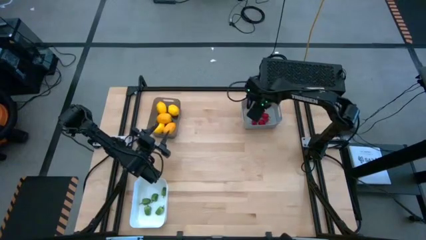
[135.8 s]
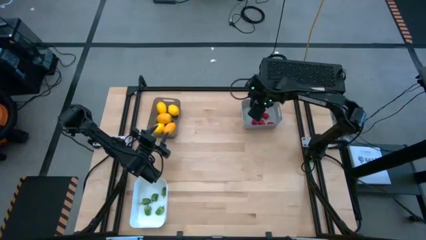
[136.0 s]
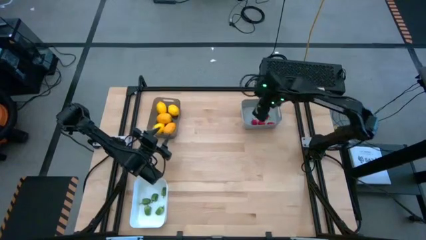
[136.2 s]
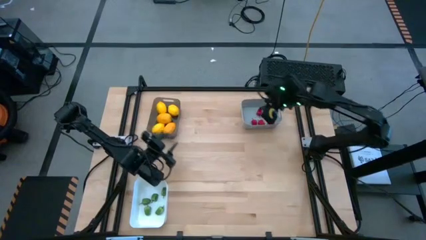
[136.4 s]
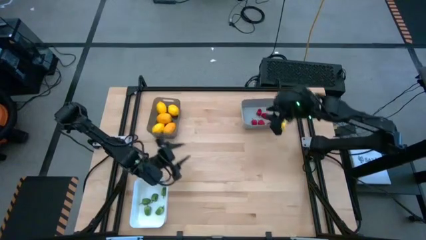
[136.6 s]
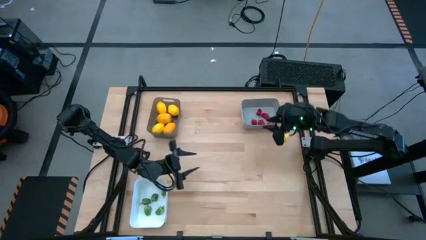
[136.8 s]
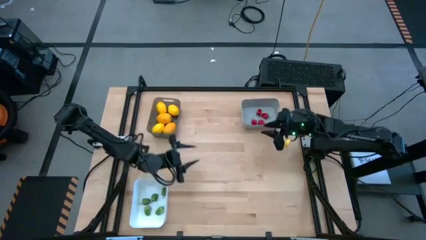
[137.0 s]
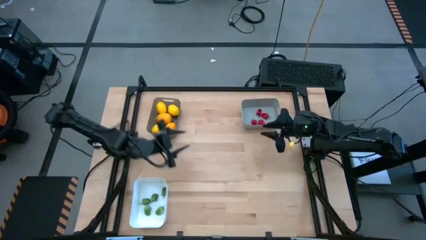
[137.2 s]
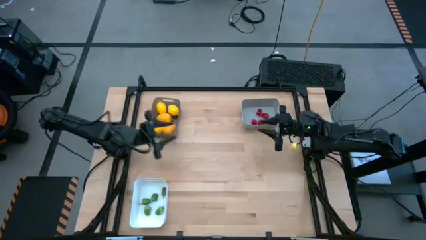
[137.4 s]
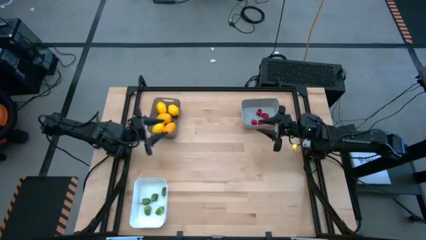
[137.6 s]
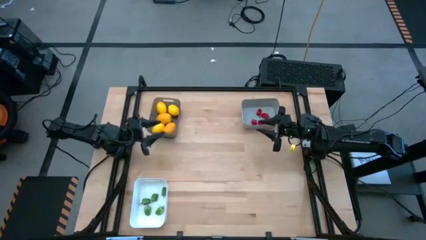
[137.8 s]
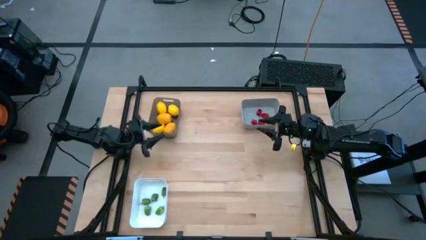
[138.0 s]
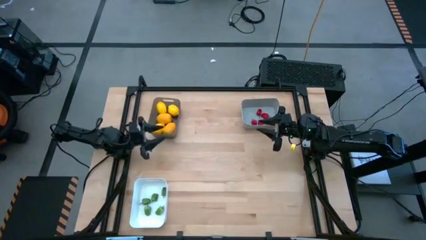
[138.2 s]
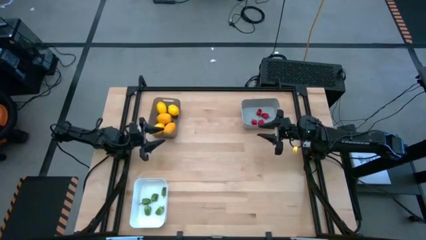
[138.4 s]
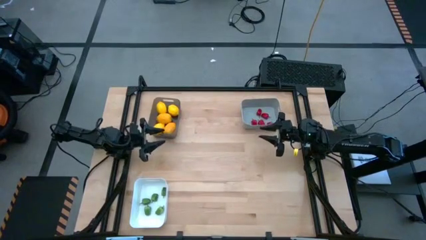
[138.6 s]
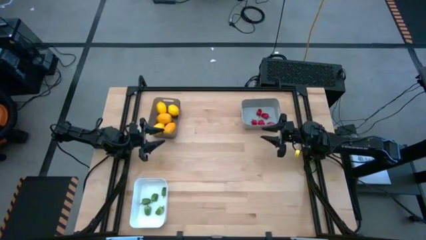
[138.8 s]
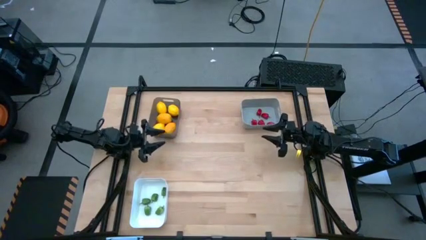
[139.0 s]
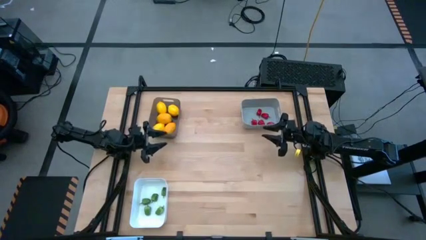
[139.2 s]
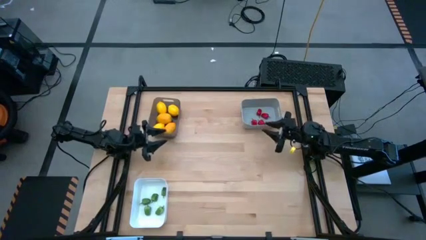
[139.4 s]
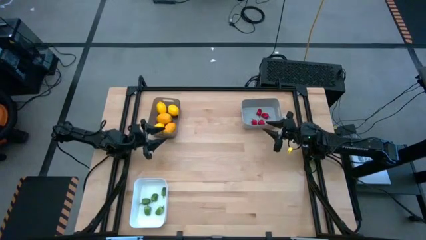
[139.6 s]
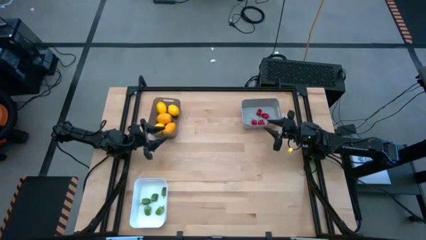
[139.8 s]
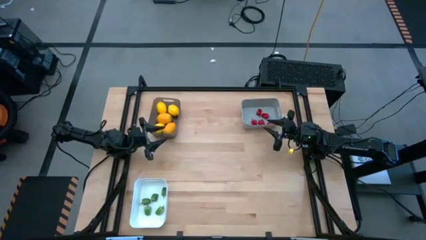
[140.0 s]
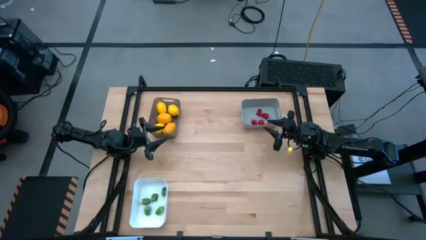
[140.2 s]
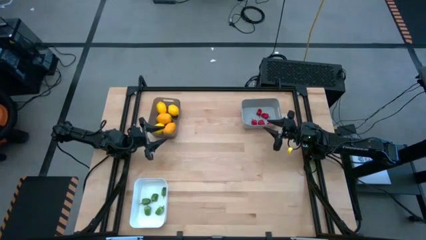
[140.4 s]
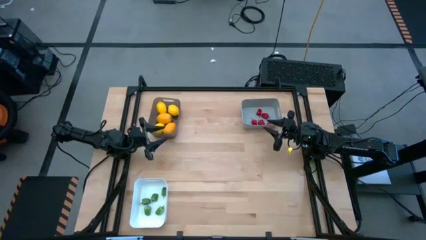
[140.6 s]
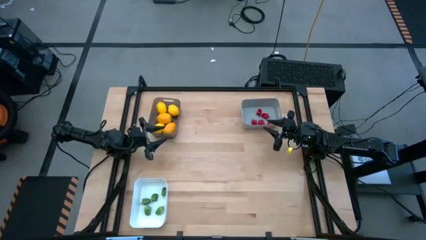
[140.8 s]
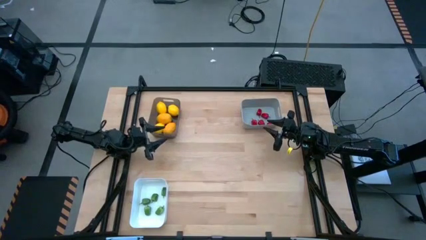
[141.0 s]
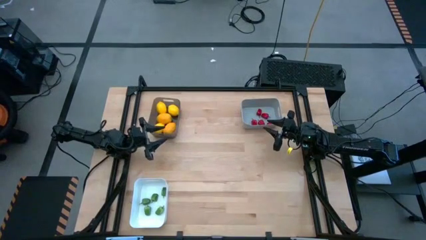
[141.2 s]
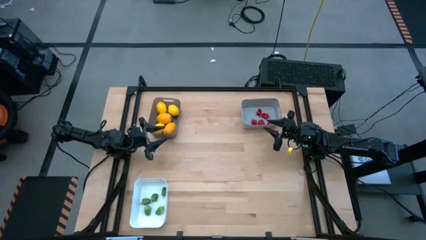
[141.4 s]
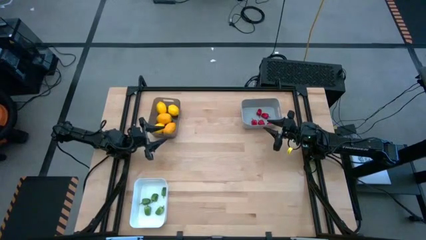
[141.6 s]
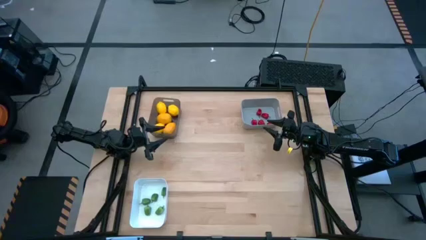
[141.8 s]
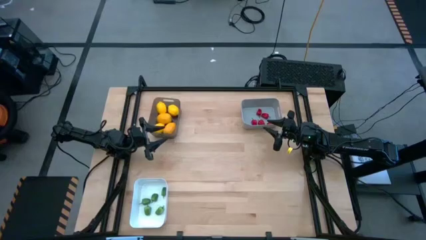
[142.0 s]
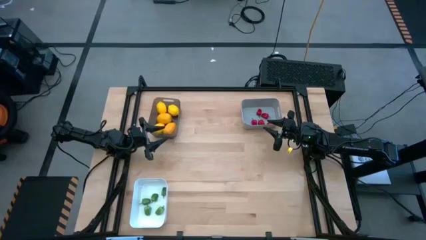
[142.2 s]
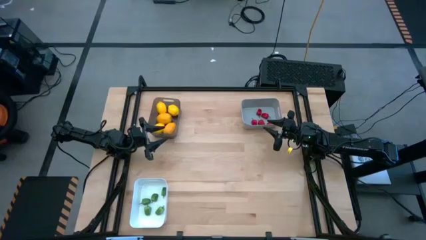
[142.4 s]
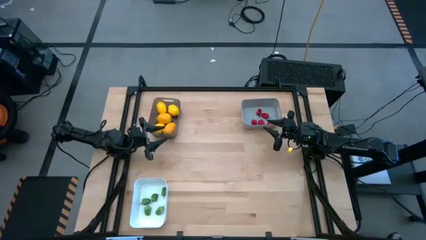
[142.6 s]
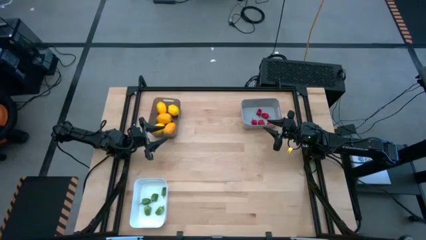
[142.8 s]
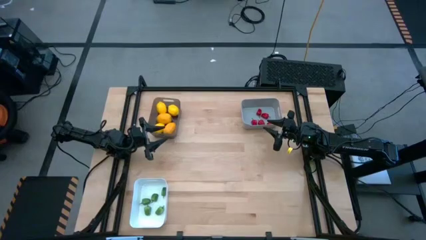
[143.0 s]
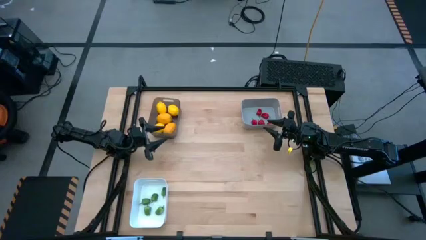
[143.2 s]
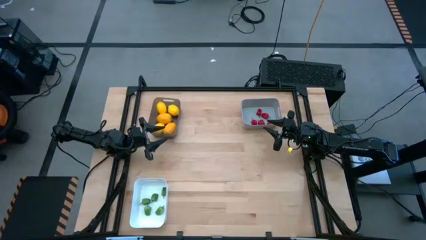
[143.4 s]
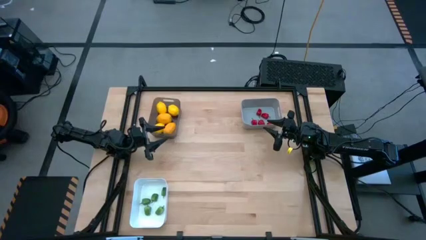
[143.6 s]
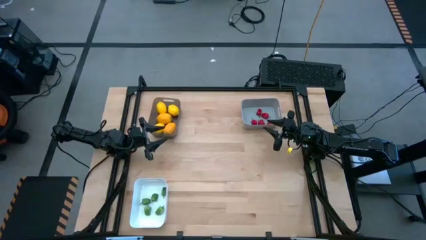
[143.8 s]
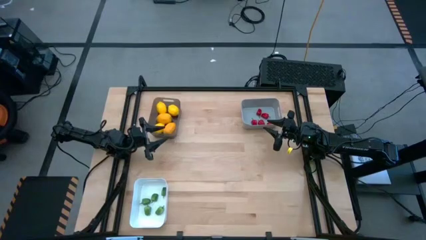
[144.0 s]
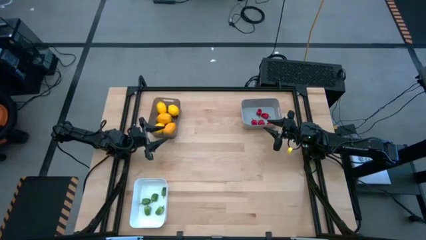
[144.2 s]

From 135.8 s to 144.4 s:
Task: Sort produce into baskets
Return to Home Position

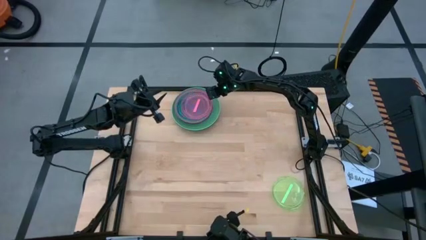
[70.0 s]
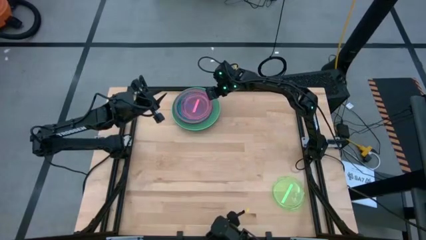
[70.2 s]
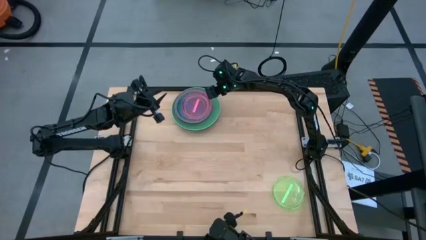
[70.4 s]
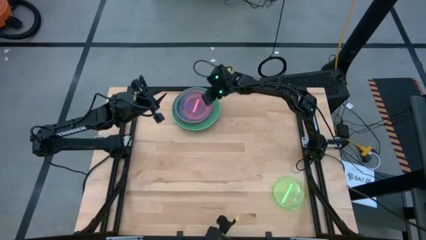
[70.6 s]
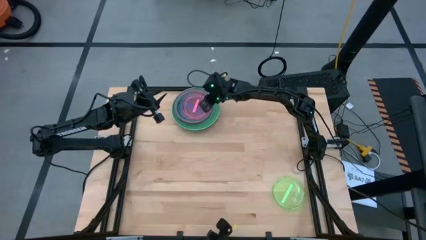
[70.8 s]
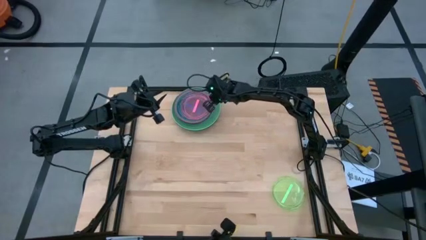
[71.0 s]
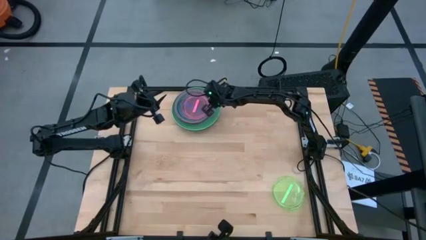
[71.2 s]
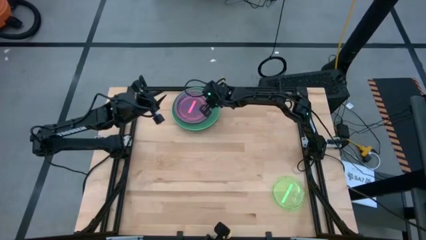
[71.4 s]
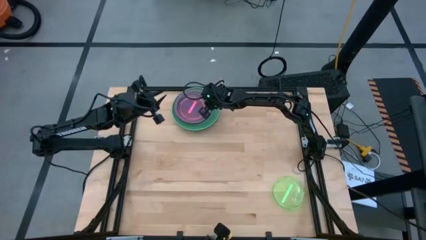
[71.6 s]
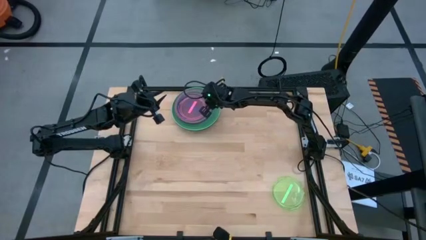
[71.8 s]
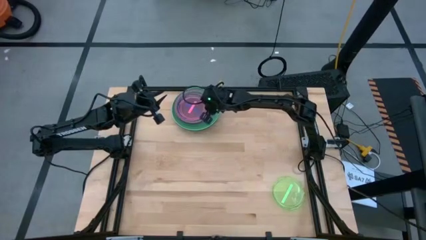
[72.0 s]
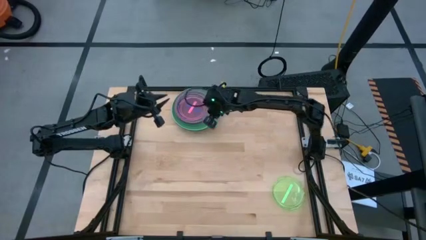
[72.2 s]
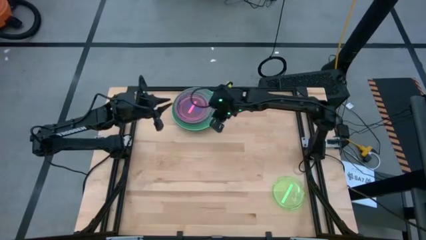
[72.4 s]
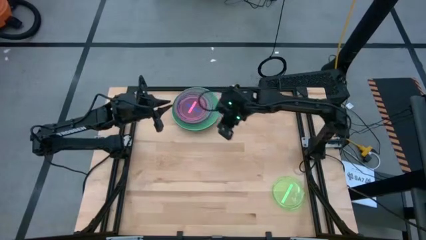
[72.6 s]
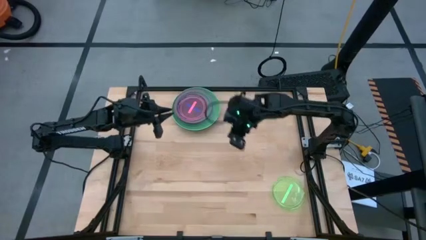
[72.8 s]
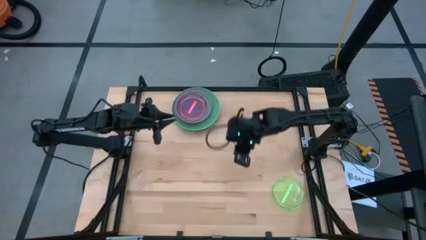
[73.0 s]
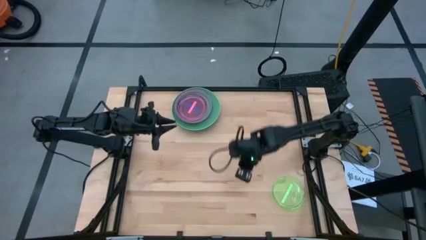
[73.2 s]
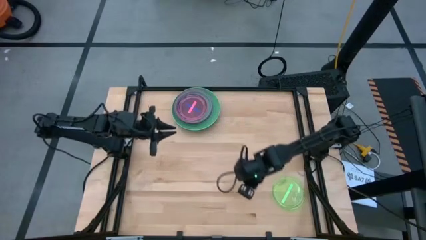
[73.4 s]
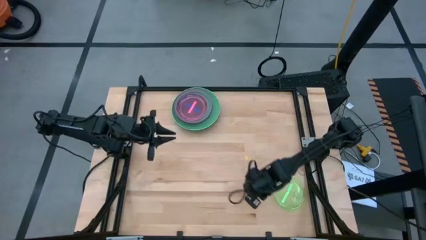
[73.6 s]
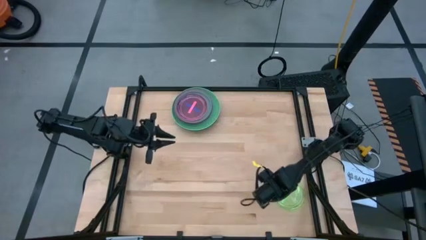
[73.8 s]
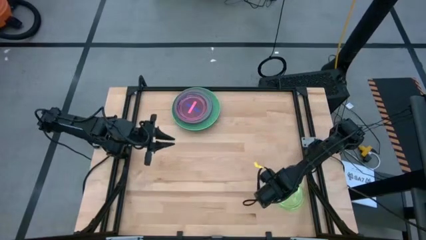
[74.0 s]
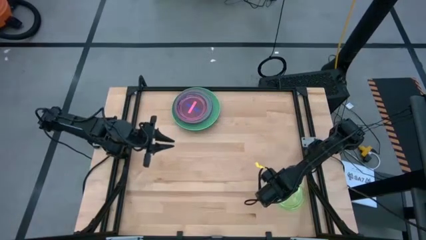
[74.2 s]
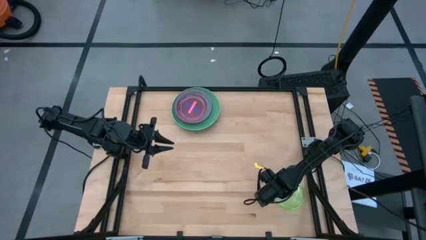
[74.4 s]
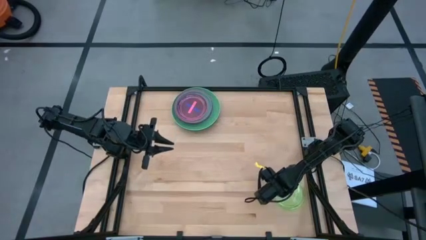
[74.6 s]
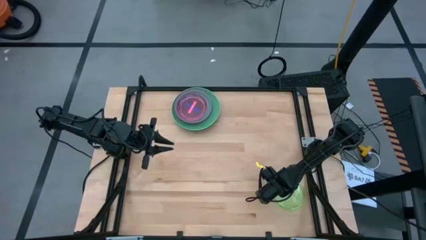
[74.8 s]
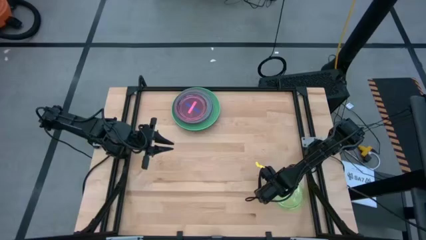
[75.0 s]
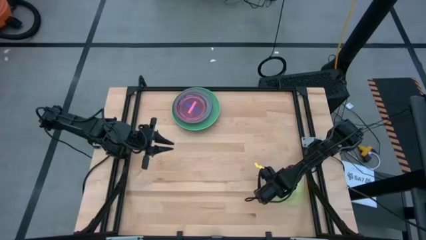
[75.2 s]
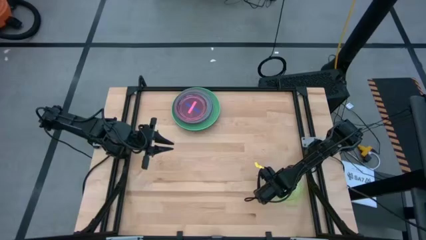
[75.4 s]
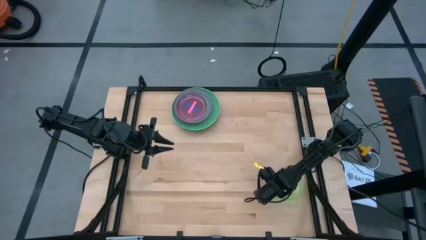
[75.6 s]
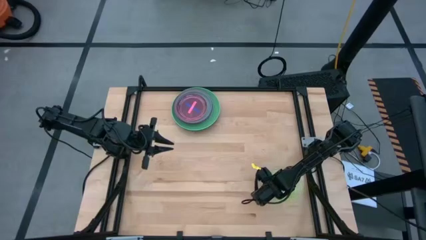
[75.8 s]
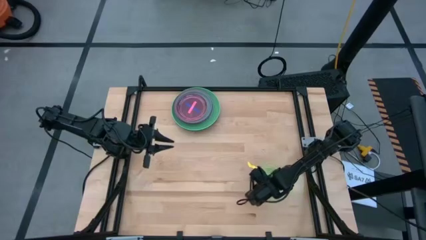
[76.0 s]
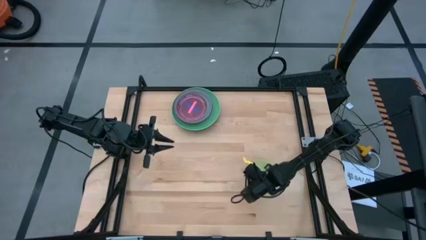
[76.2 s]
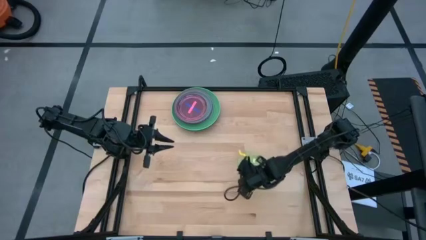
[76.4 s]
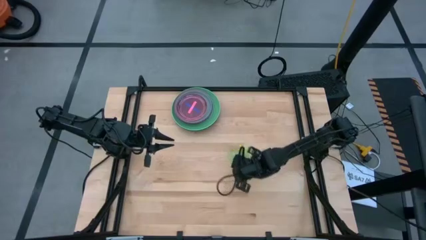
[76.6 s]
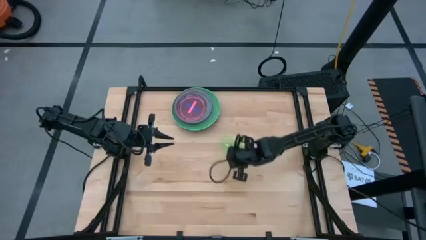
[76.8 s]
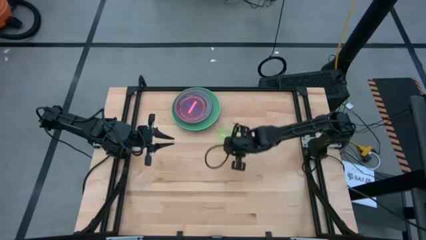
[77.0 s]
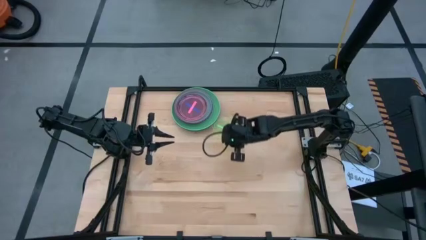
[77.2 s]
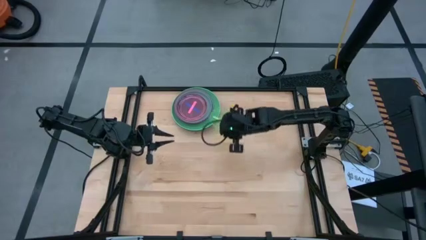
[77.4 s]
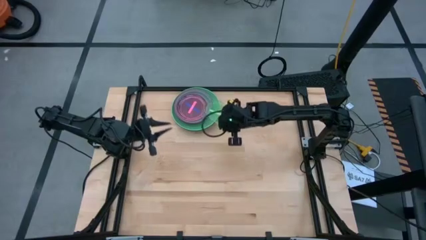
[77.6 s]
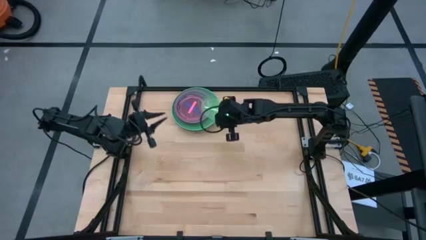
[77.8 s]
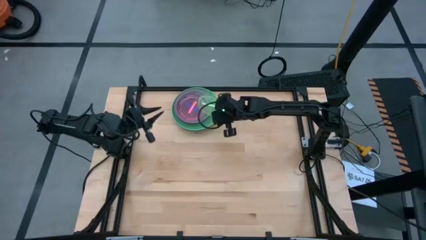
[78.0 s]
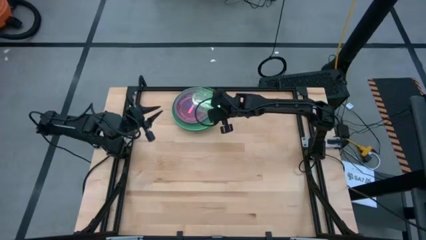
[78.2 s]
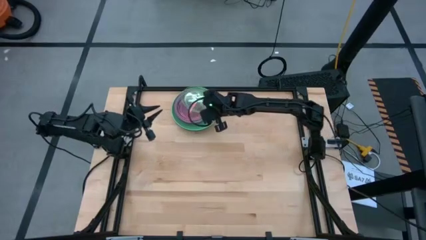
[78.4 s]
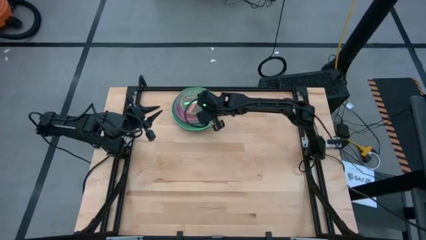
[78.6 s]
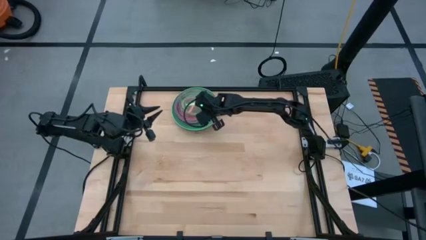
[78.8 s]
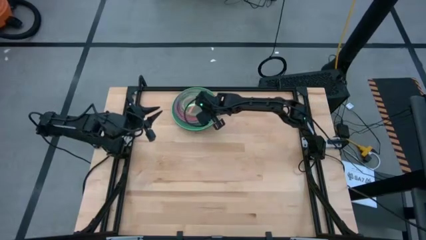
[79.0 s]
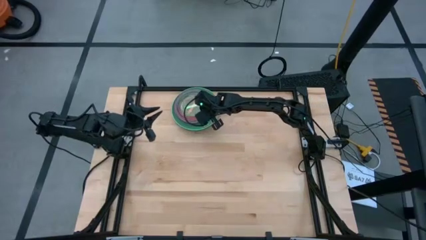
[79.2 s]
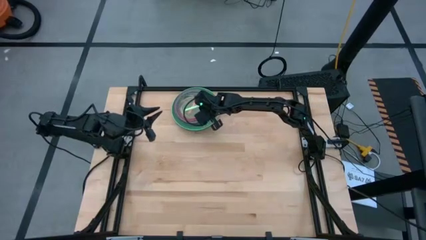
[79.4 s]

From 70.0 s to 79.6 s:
Task: Stack plastic plates
Stack the green plate on the red plate
